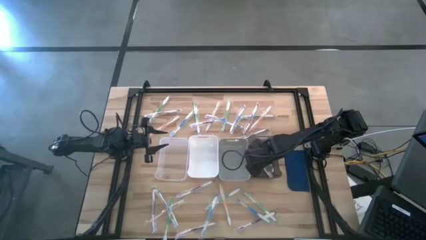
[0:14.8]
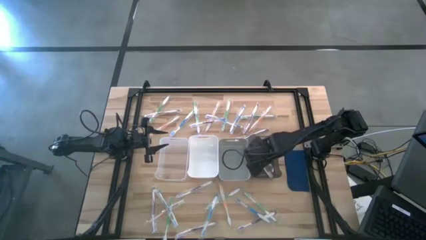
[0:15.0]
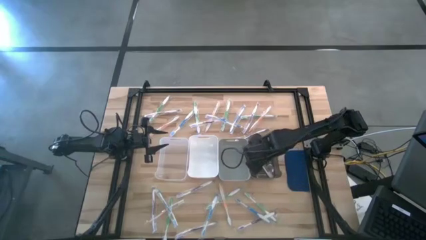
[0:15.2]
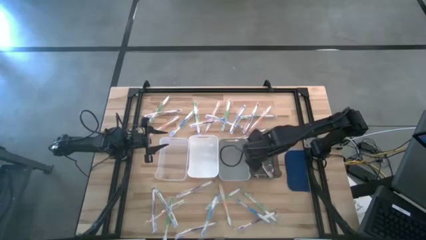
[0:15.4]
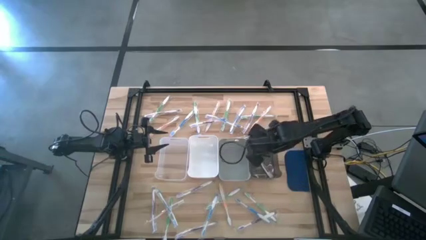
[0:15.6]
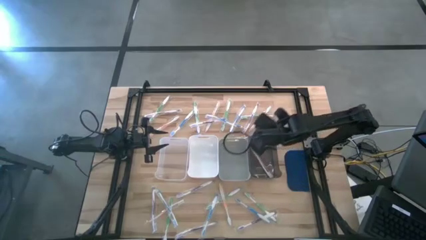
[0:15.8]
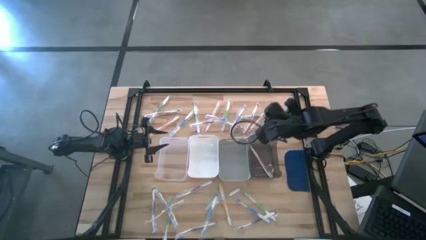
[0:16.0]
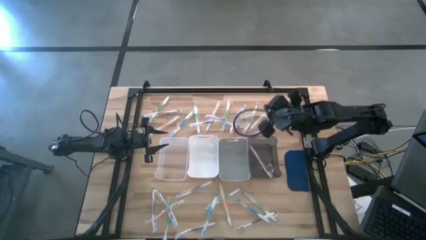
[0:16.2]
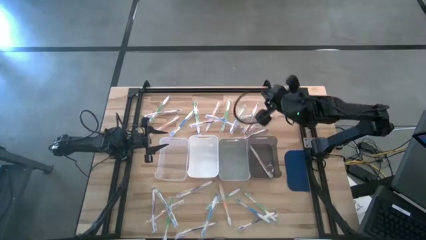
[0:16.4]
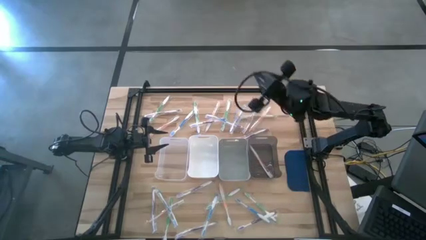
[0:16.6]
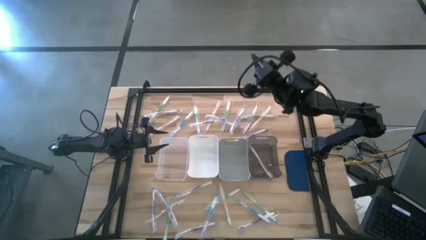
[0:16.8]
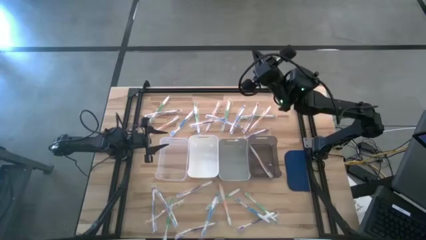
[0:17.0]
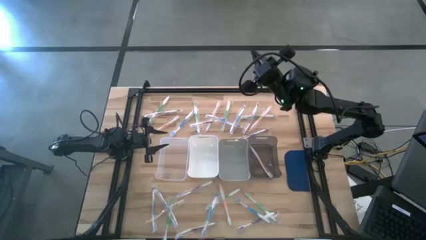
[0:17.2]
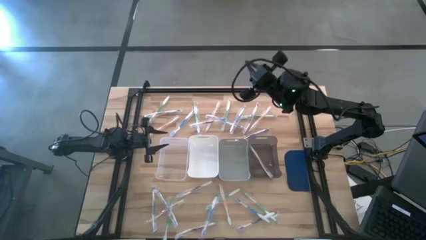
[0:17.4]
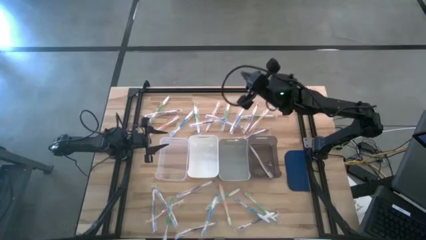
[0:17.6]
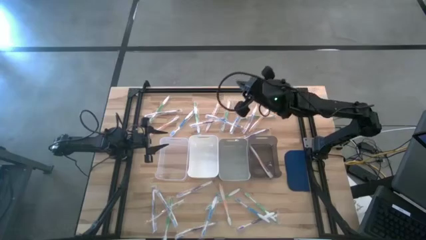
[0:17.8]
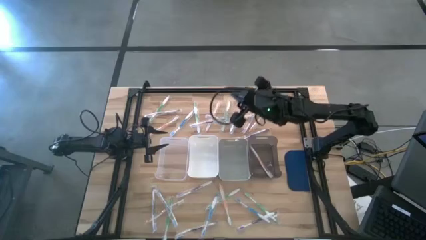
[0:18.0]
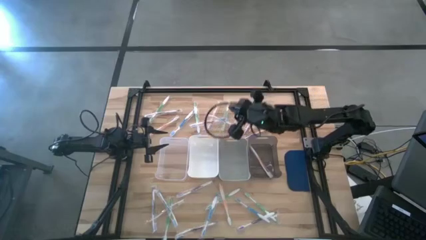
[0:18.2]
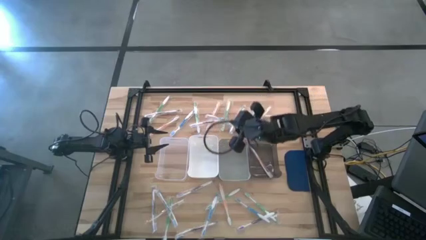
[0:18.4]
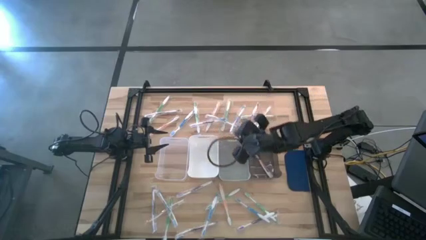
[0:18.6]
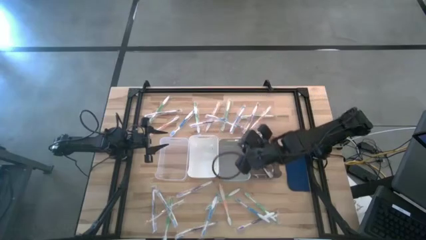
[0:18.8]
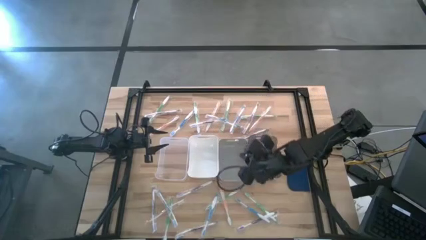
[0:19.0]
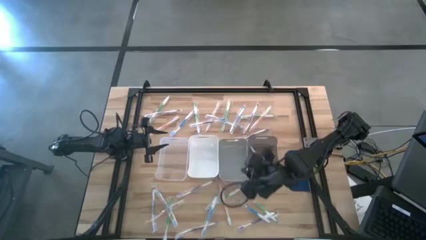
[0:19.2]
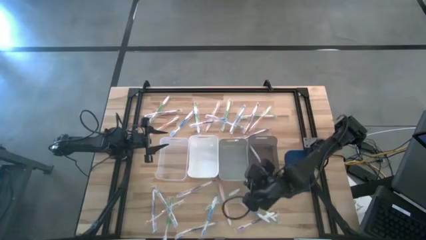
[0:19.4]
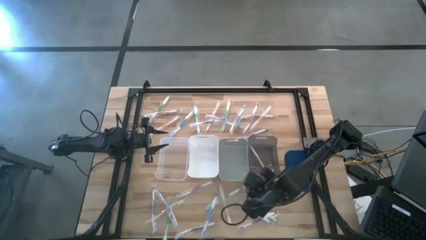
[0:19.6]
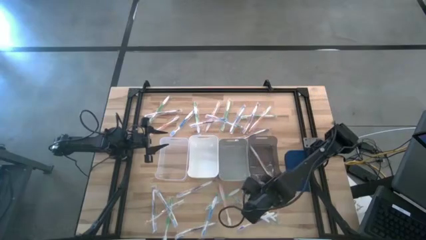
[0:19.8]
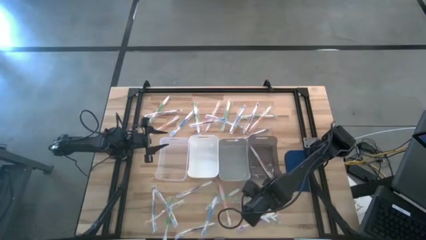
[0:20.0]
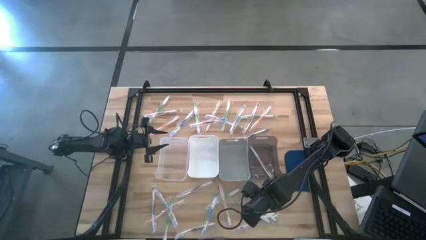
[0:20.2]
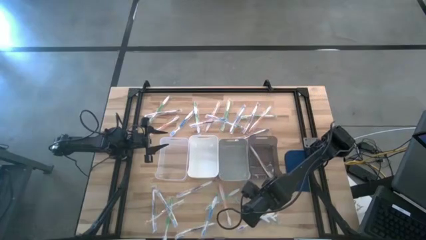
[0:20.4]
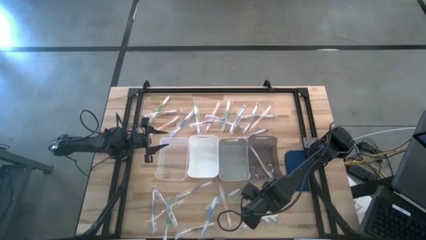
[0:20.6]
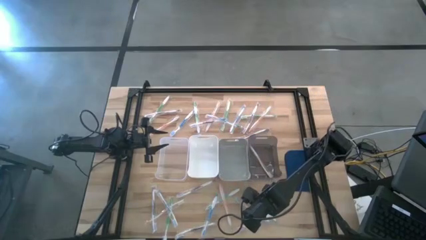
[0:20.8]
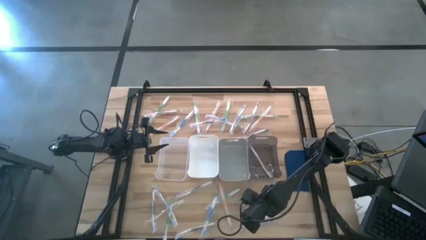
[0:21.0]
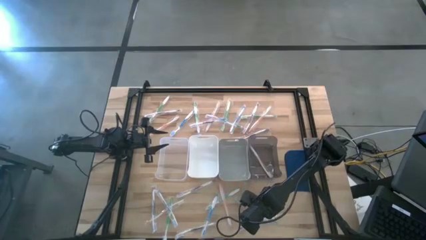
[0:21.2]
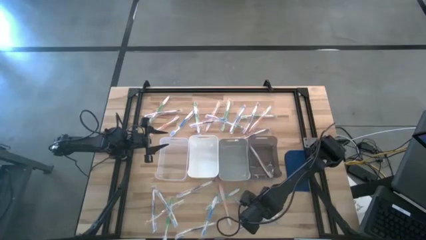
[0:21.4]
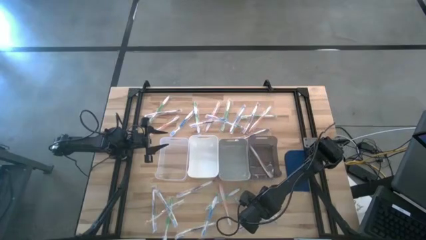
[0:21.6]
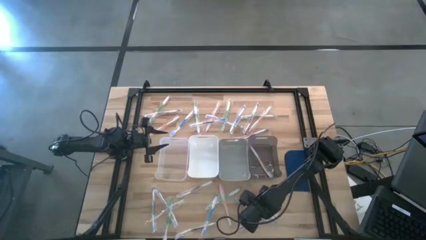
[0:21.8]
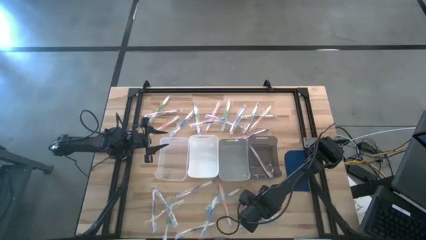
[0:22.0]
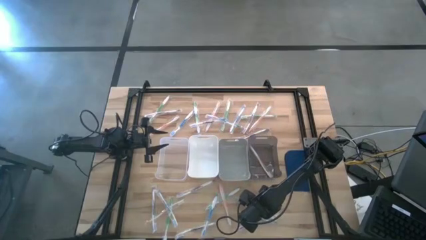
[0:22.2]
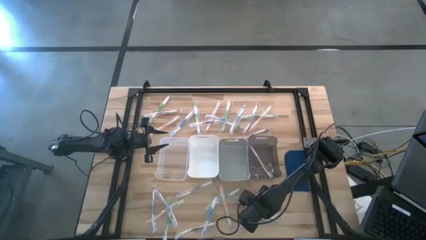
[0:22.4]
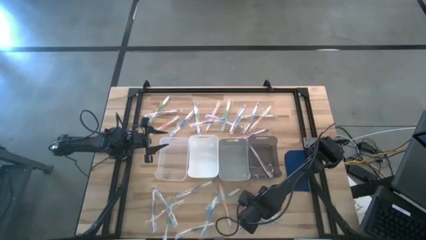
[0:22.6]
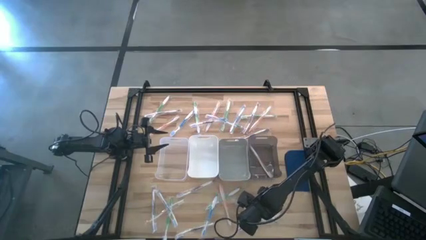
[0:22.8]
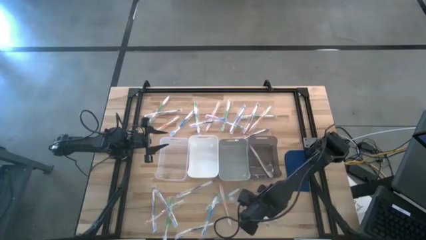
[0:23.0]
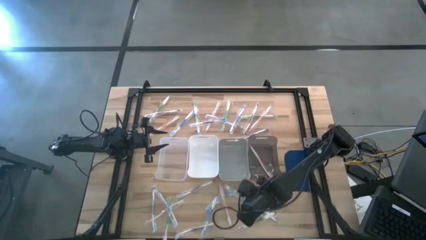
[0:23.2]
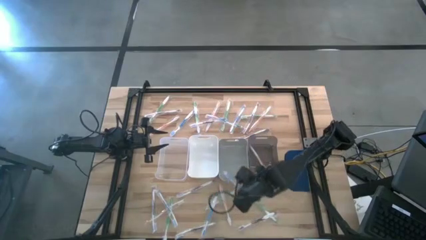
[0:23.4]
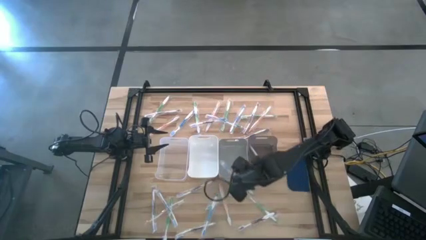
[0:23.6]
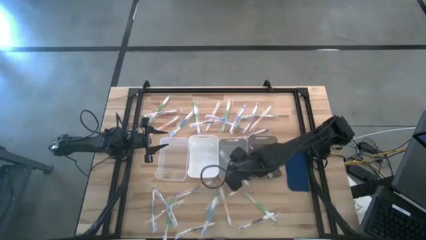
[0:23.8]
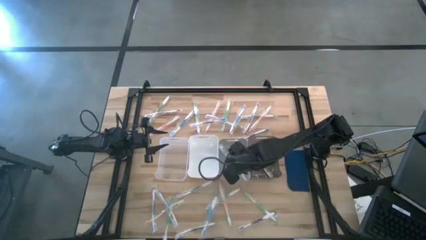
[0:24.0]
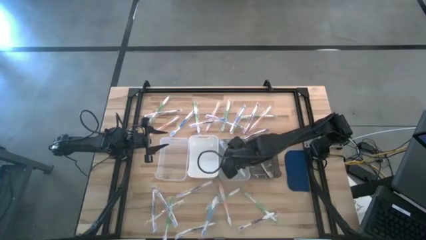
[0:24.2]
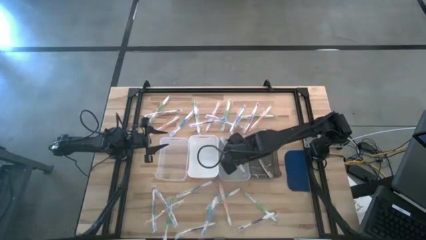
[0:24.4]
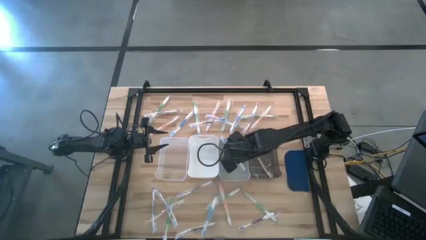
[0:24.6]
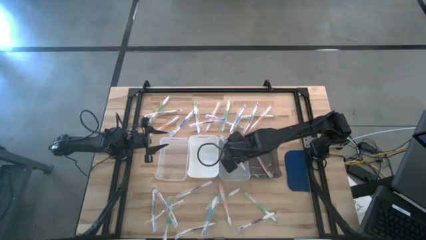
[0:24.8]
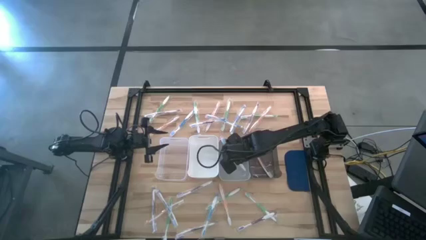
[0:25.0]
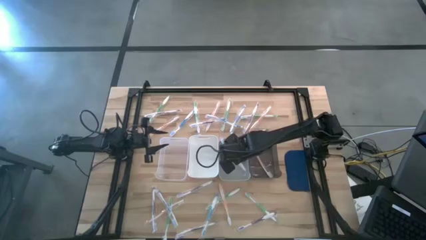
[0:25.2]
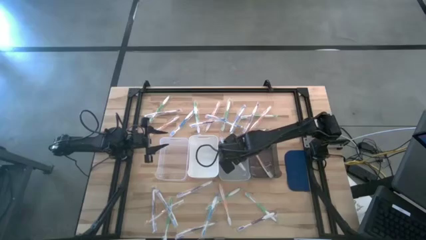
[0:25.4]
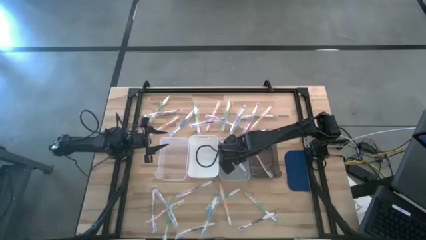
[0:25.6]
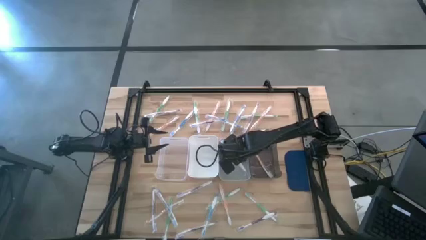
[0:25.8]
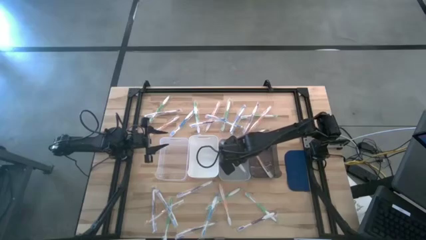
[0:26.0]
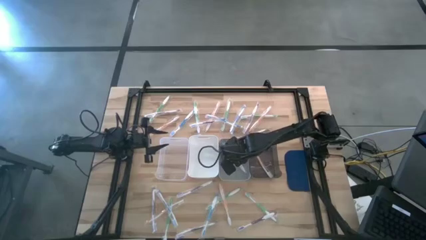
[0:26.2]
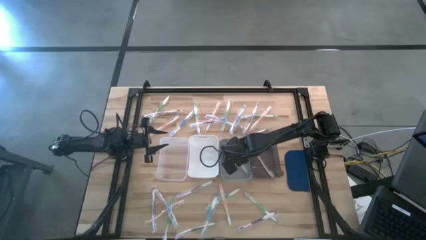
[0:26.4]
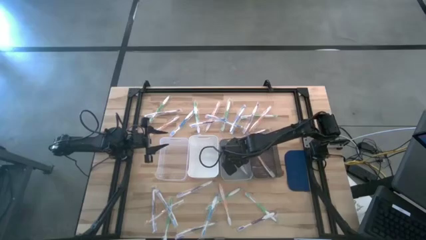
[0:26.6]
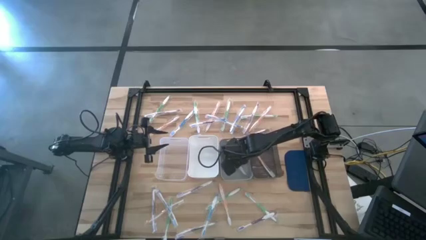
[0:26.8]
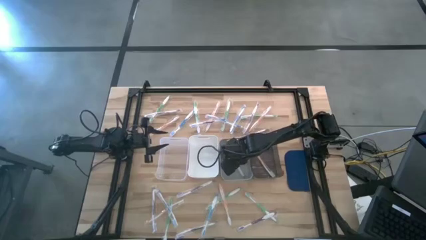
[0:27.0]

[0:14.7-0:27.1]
Task: Pick & Place Toothbrushes
Put the blue toothbrush into the gray bin
